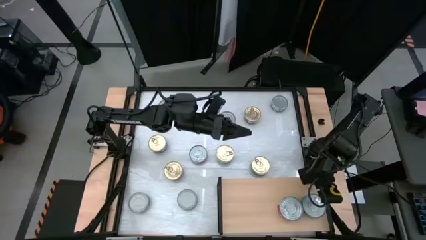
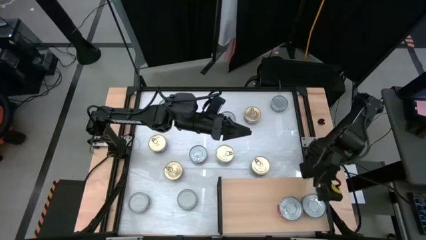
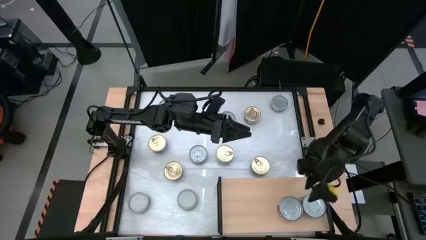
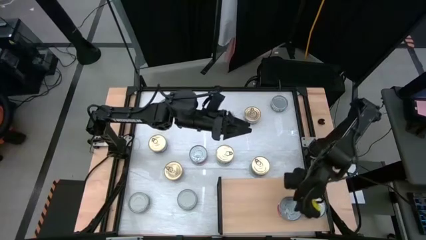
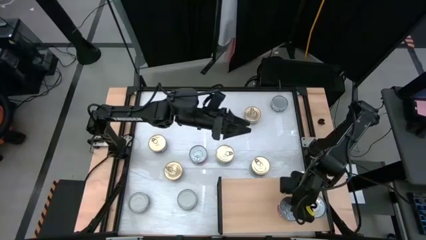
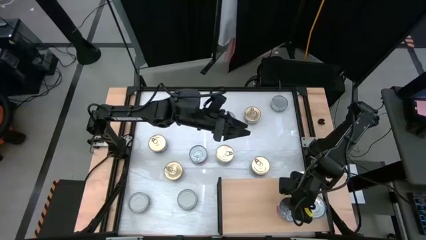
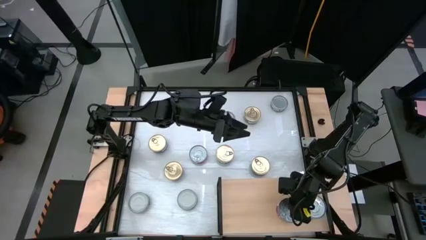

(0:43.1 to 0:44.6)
Task: Stack canned seafood by type on shelf
Adjust the red tuna can on the shelf

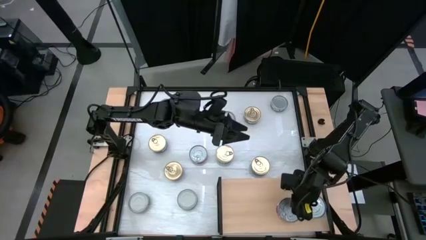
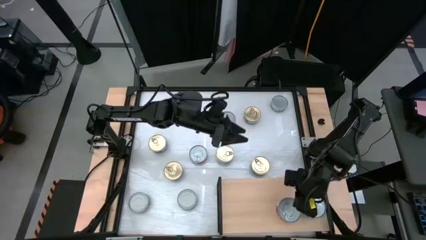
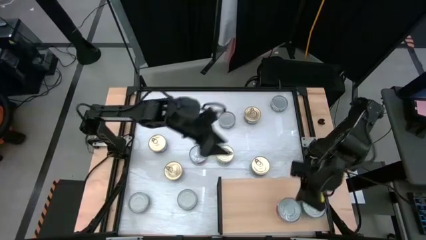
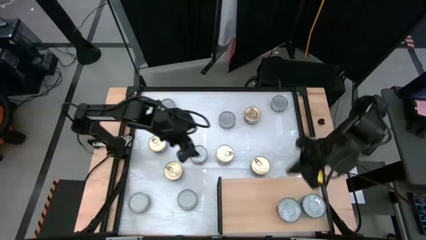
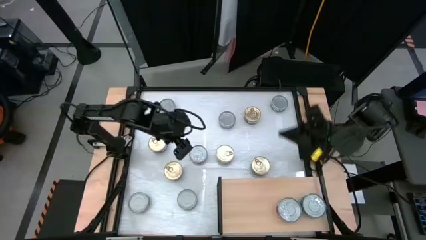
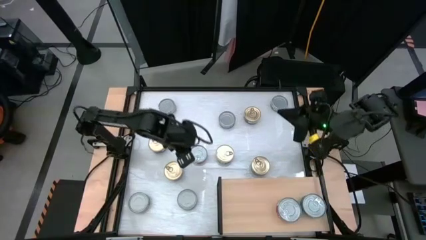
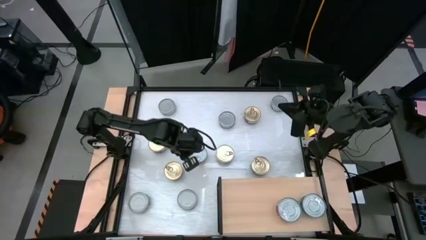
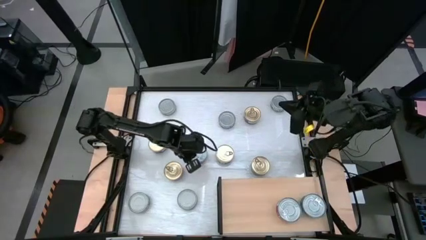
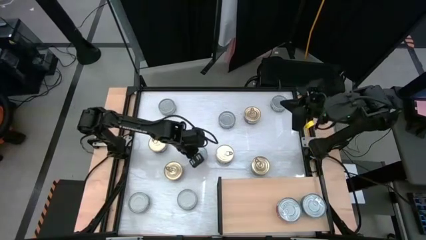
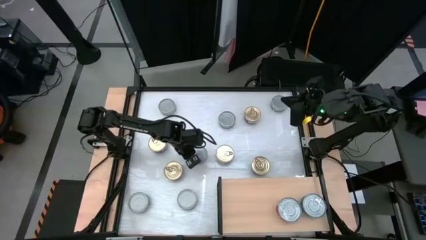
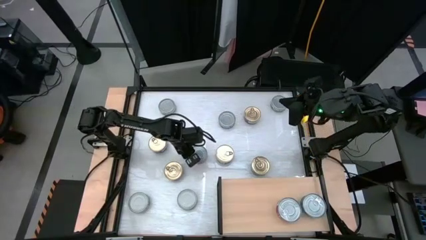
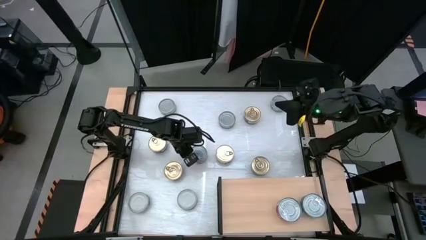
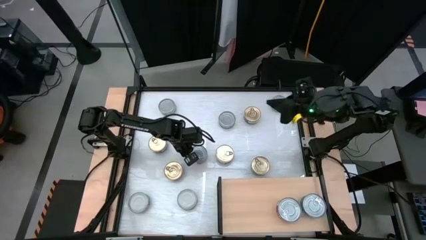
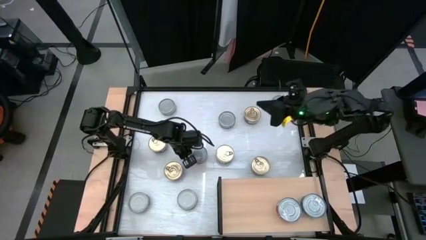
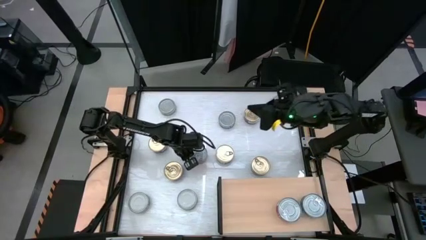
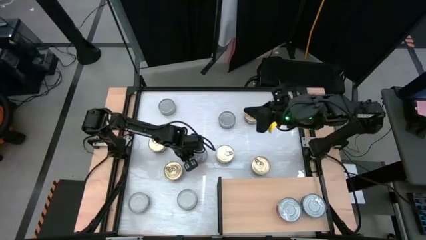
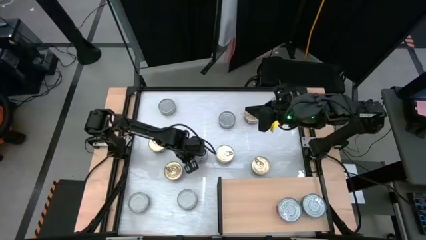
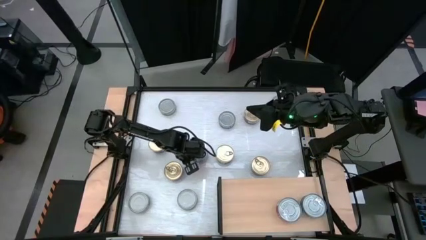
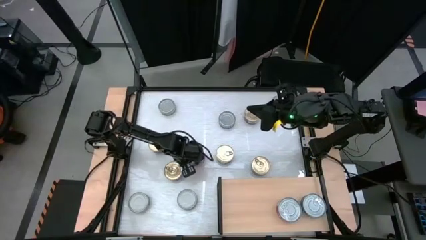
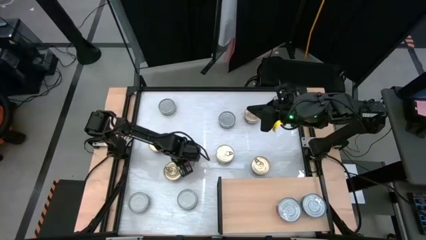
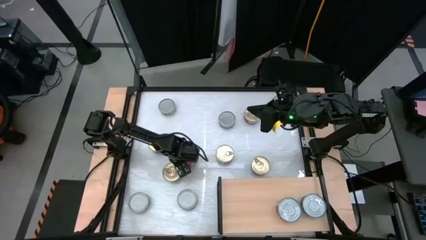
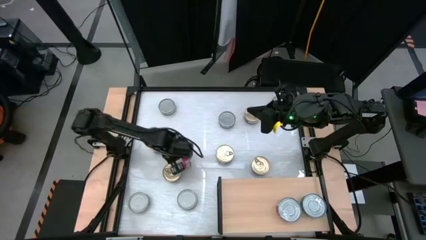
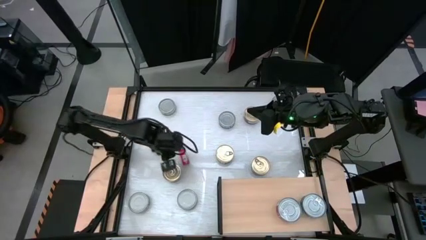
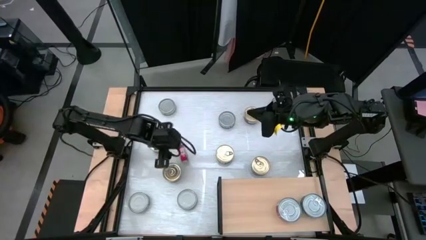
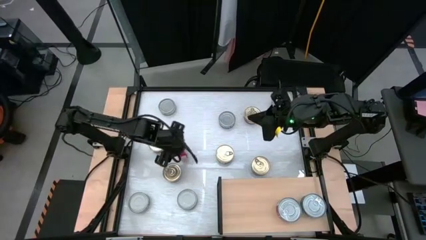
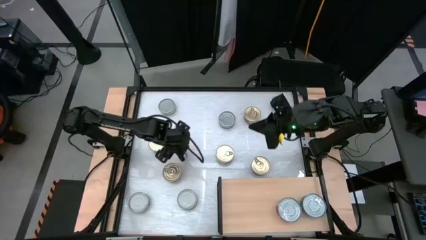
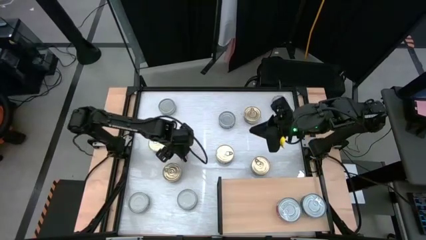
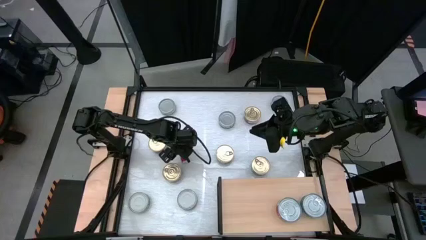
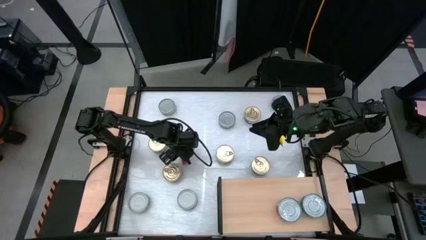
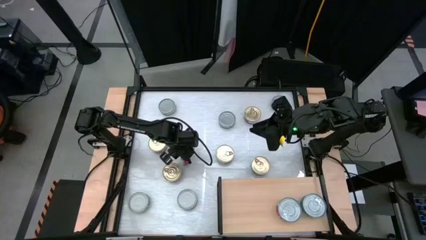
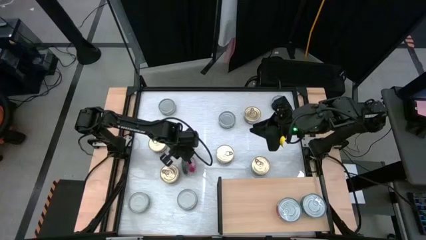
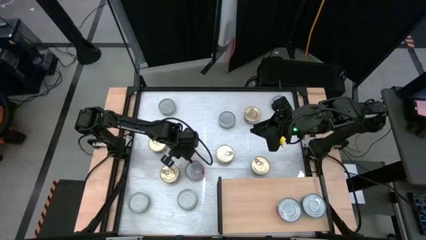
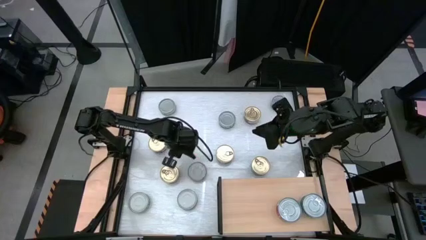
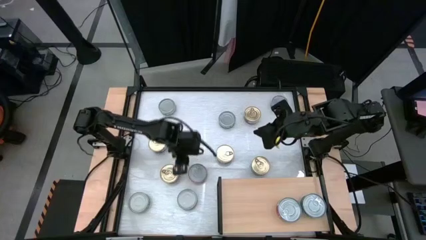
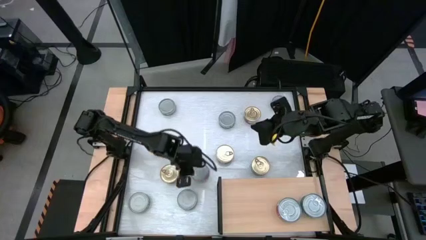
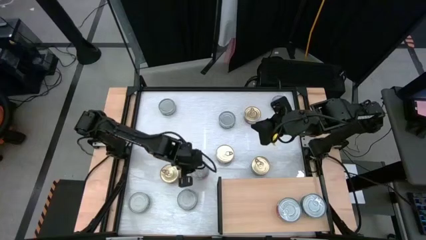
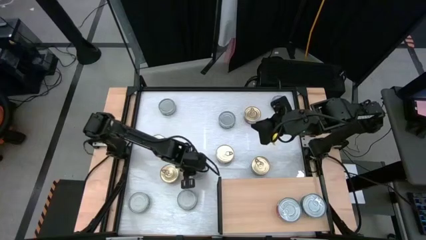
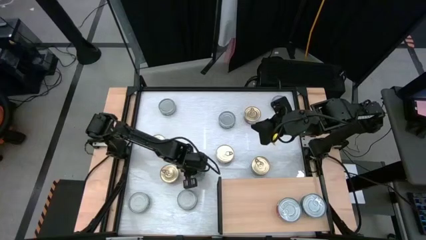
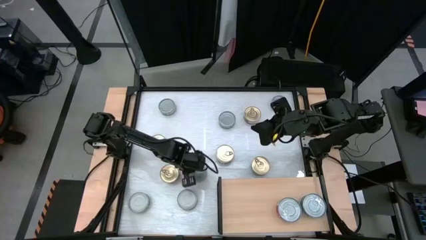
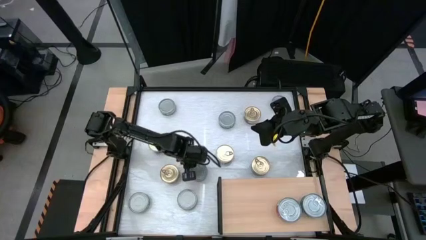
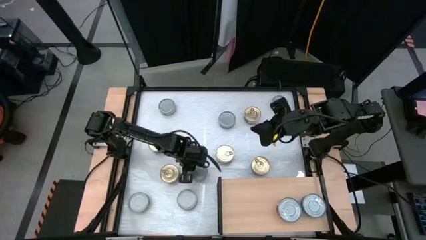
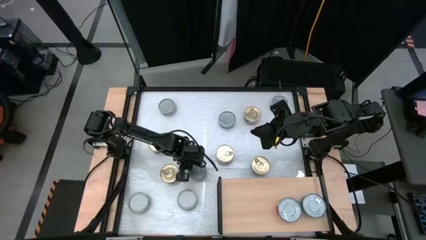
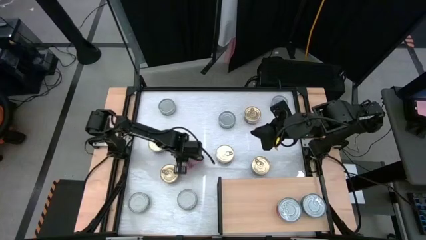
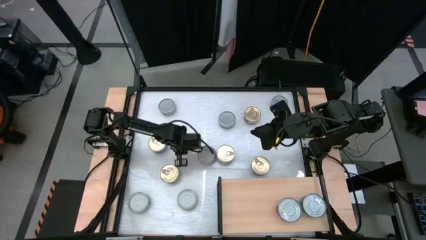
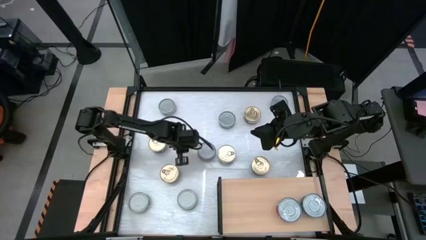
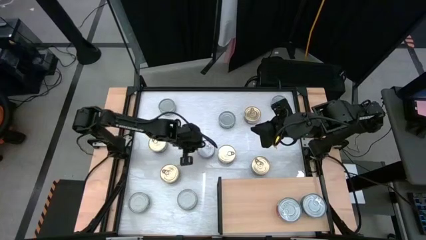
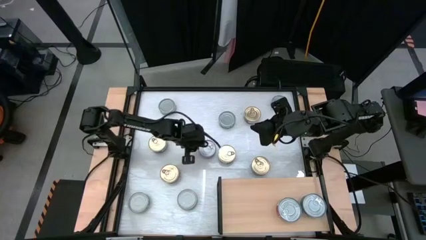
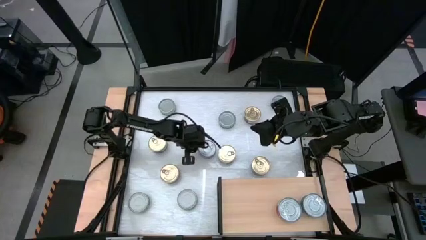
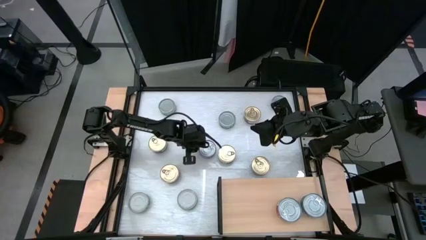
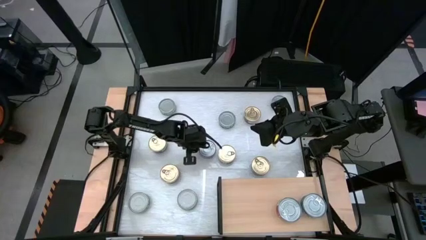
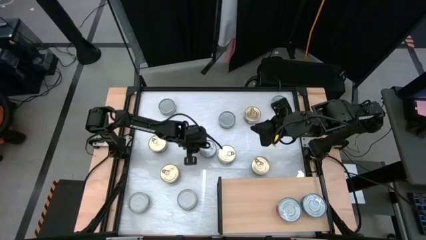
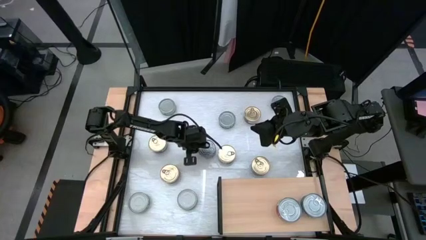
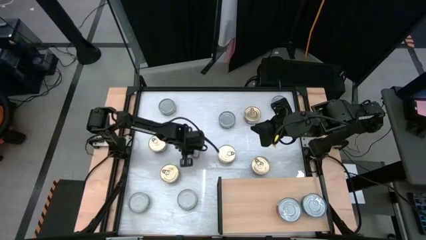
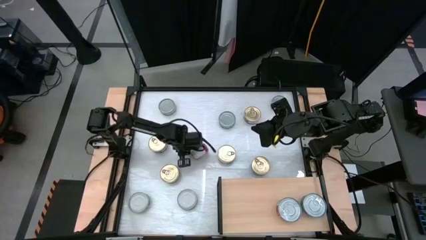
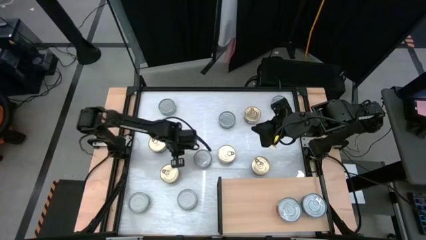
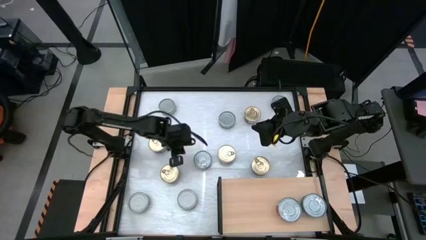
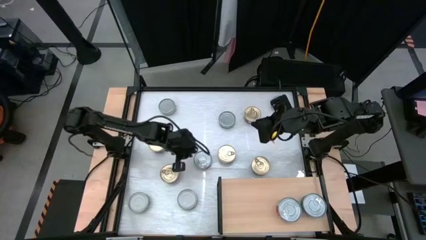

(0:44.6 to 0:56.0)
Stack the red tuna can on top of the other red tuna can on the shelf

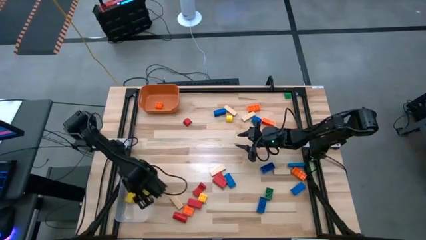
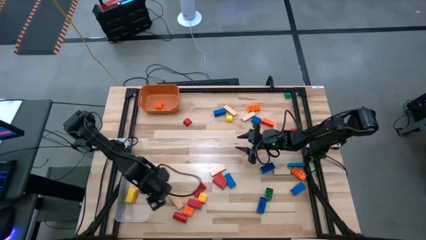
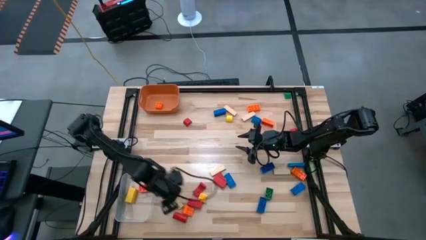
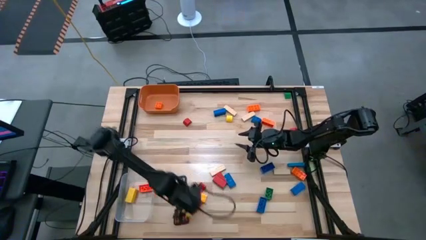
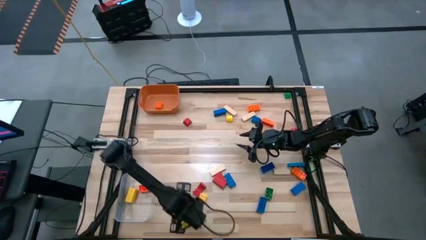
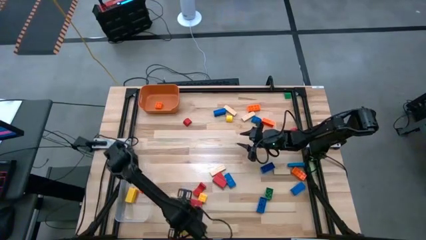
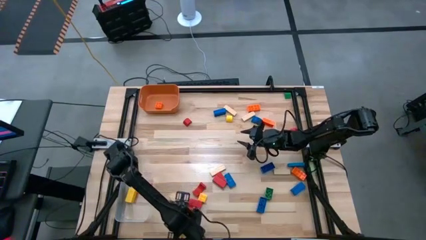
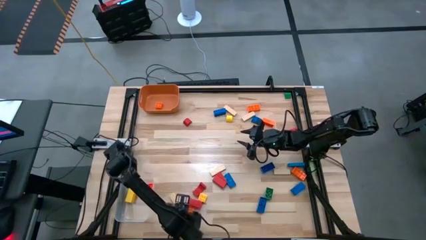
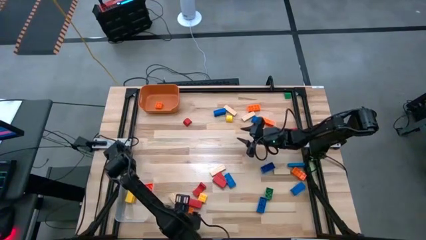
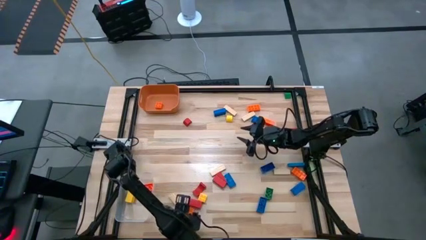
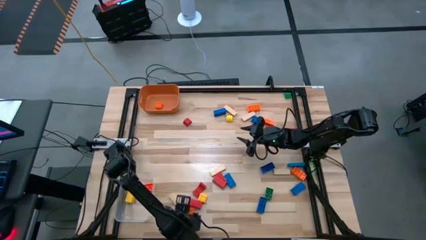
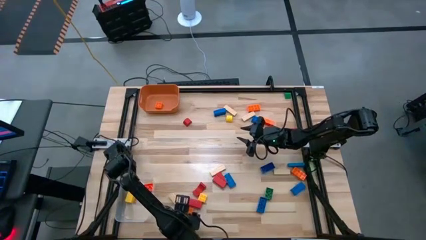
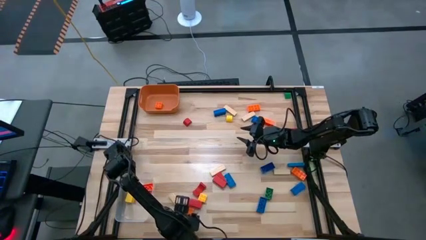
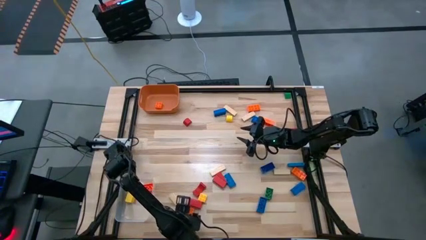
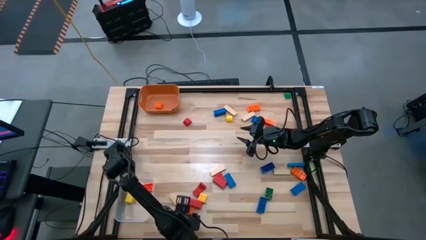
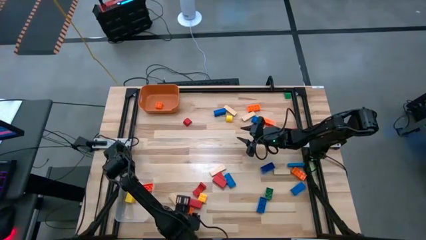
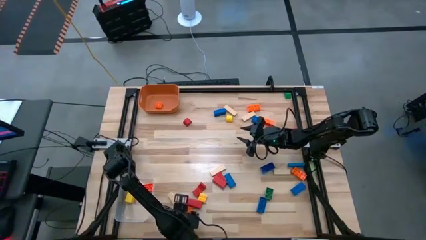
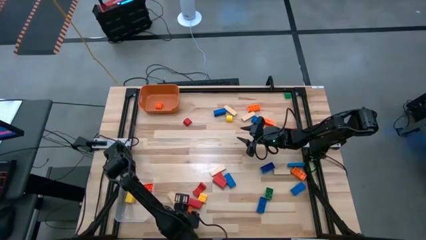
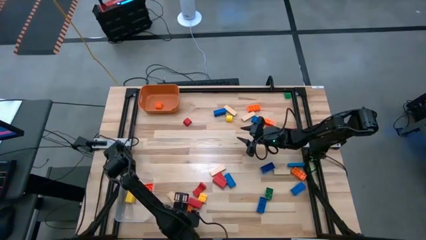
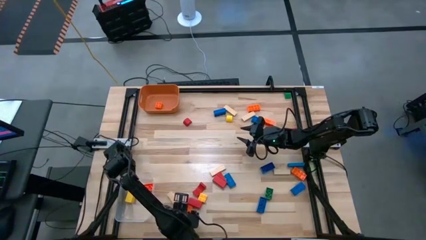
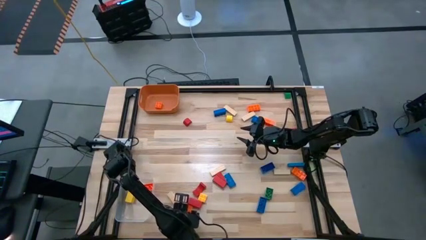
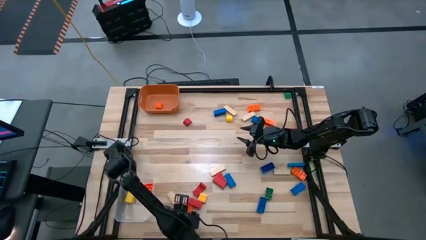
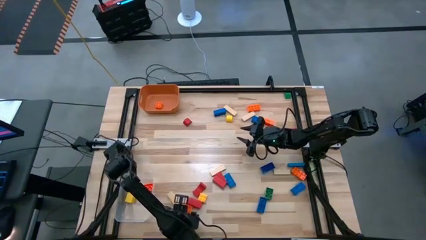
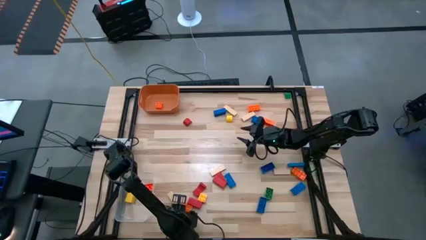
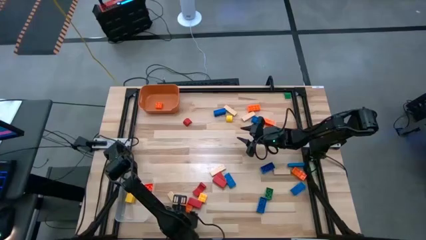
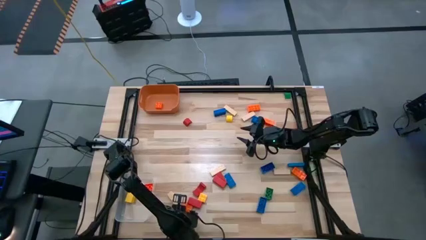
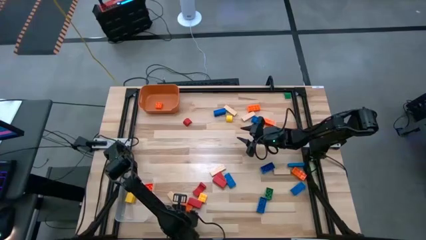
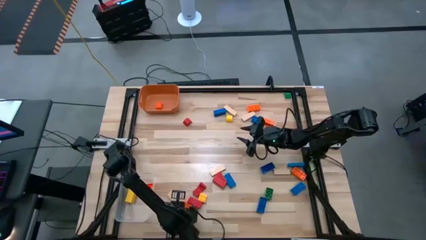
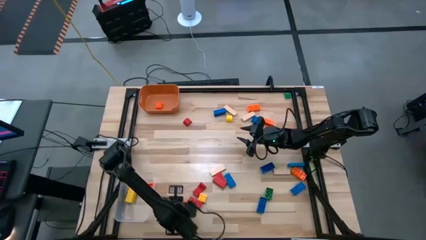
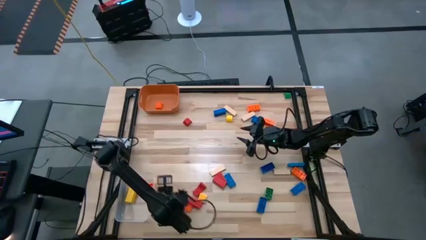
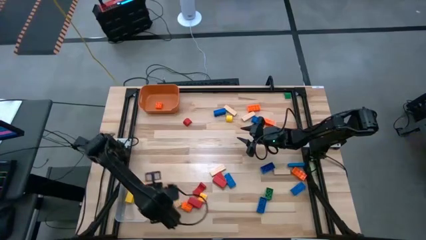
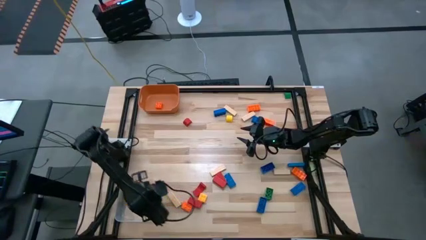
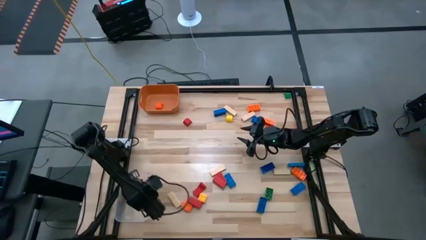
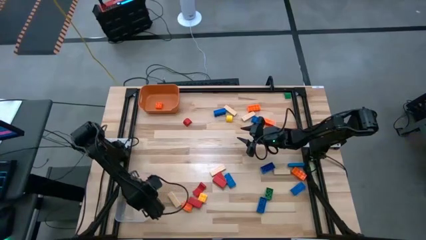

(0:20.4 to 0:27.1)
Task: Sort blocks by size
Put the large red block into the transparent bin
